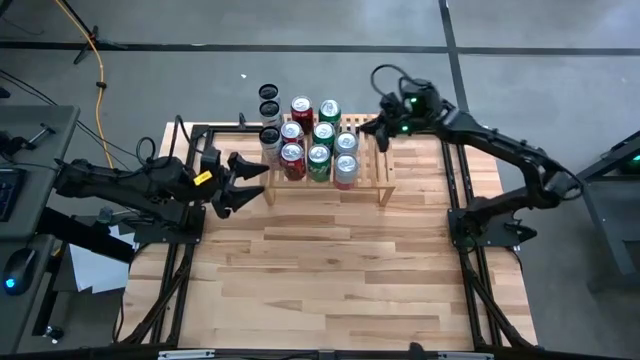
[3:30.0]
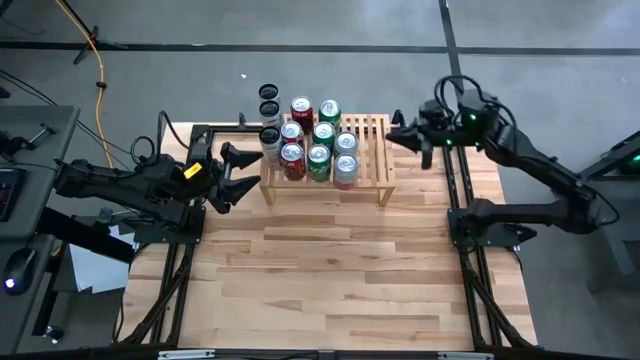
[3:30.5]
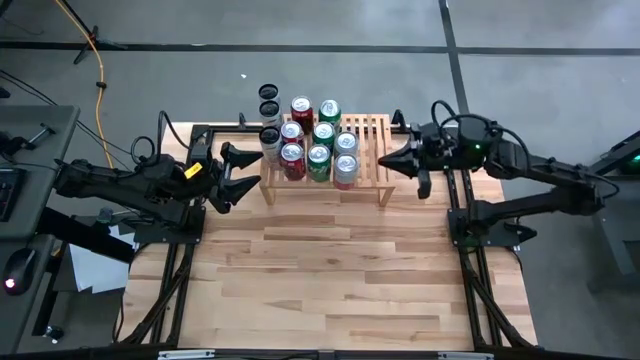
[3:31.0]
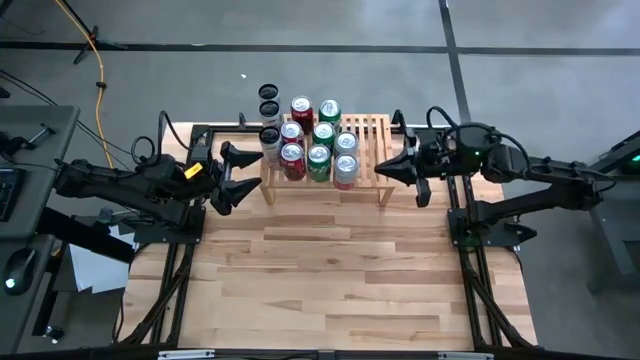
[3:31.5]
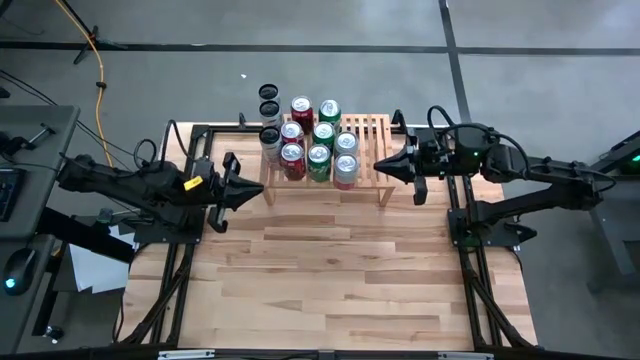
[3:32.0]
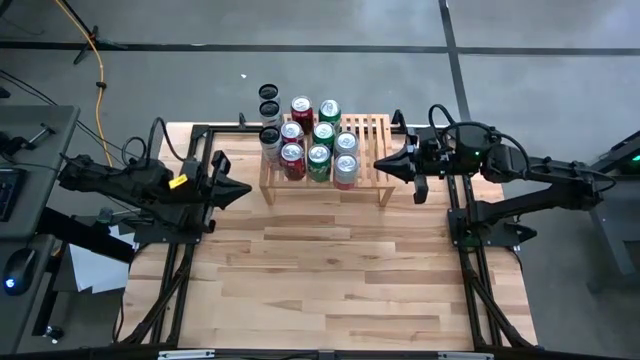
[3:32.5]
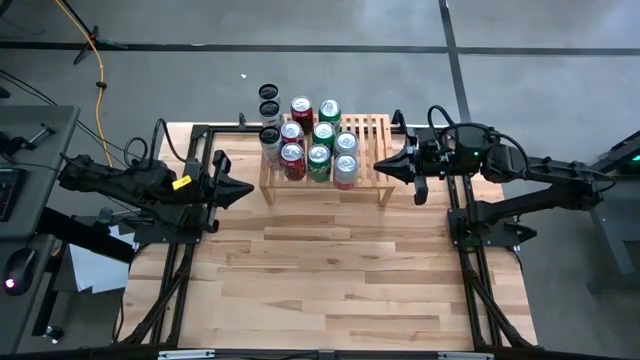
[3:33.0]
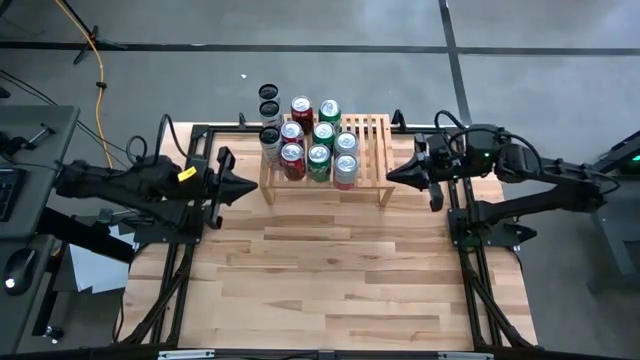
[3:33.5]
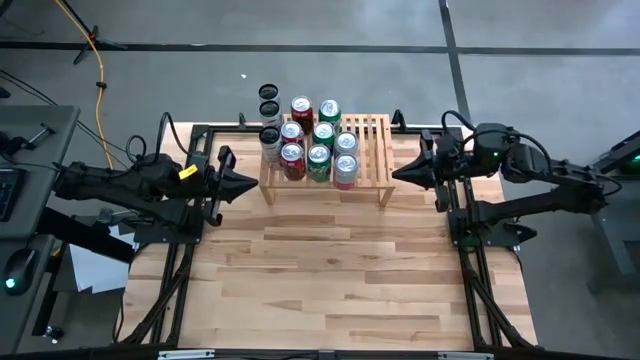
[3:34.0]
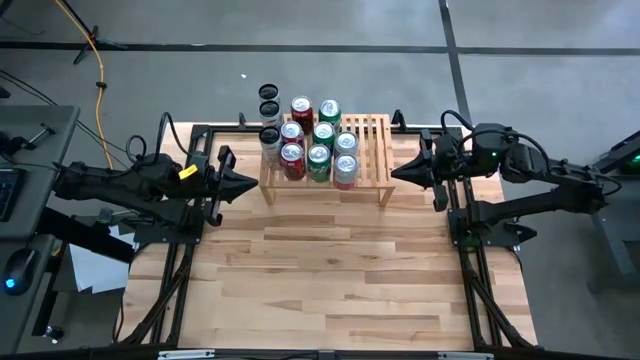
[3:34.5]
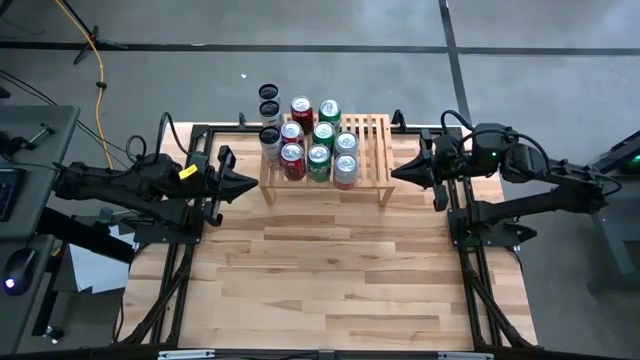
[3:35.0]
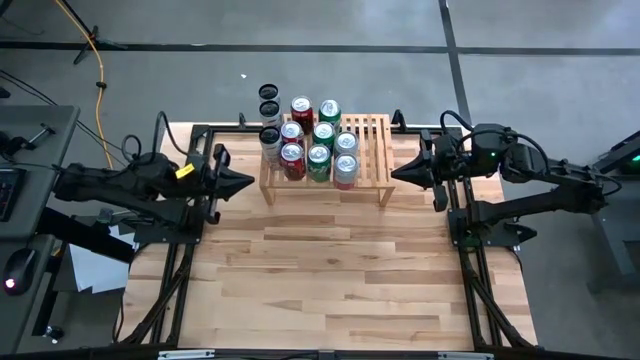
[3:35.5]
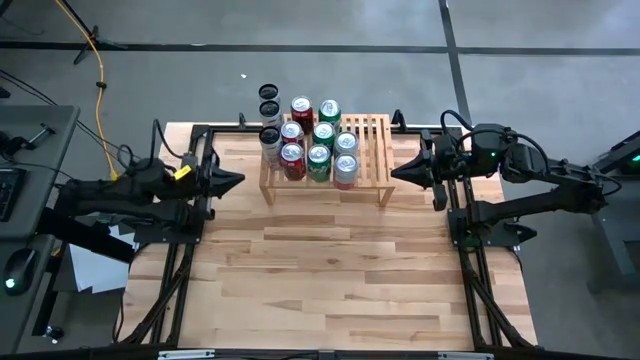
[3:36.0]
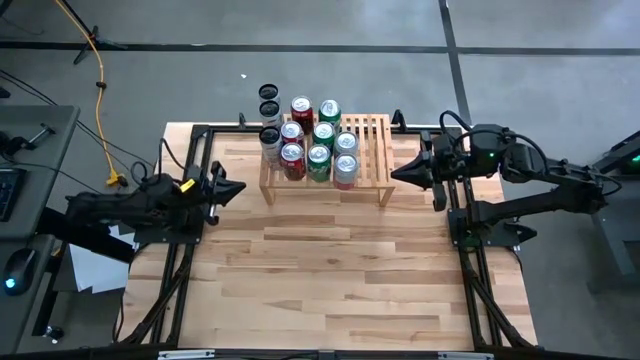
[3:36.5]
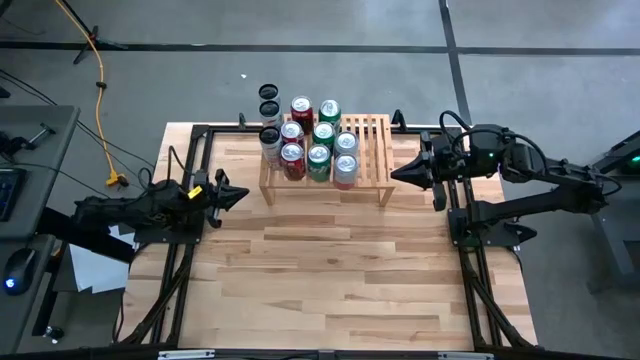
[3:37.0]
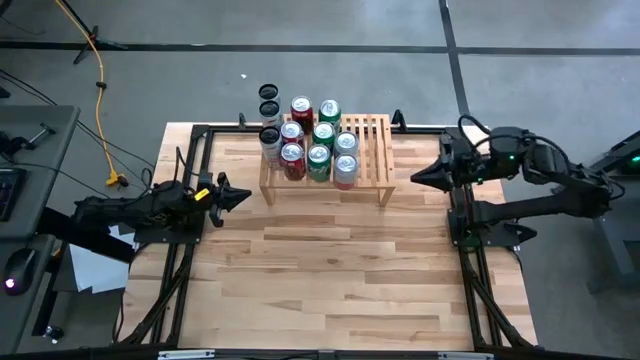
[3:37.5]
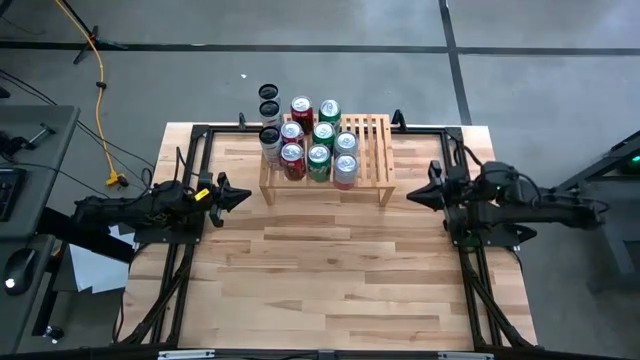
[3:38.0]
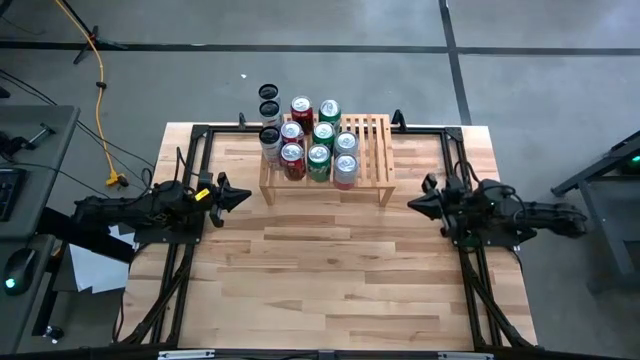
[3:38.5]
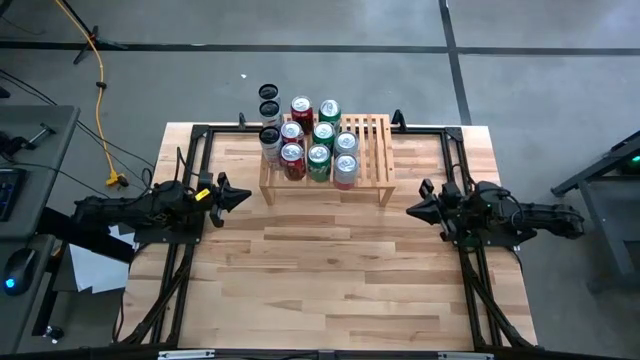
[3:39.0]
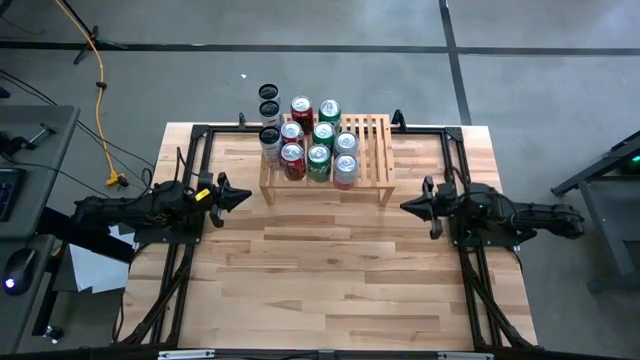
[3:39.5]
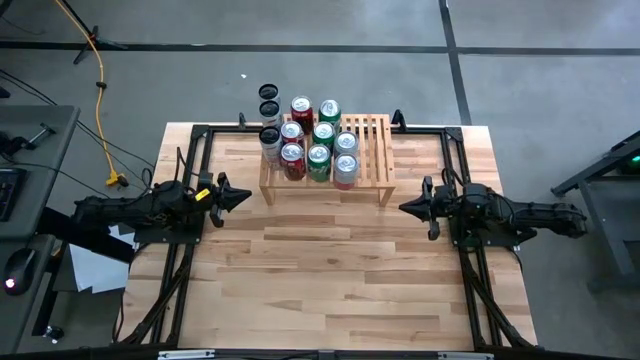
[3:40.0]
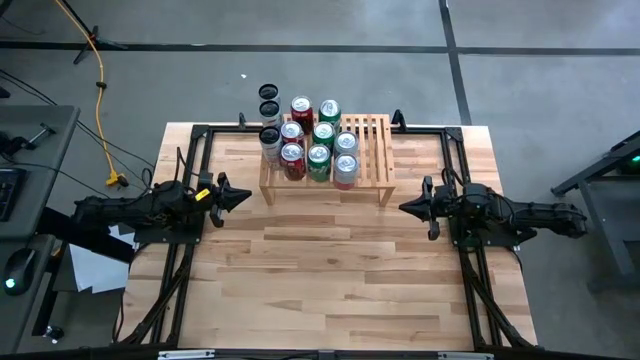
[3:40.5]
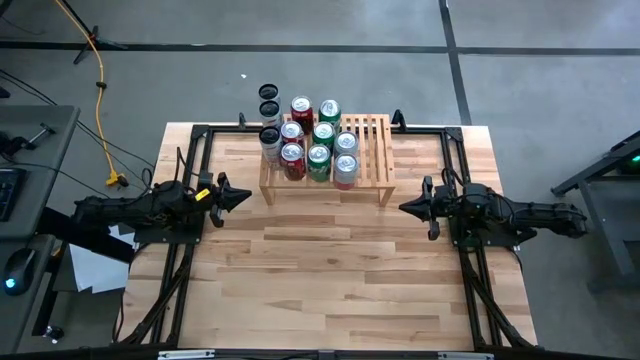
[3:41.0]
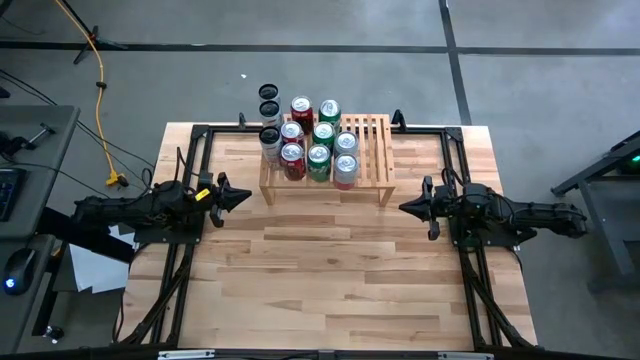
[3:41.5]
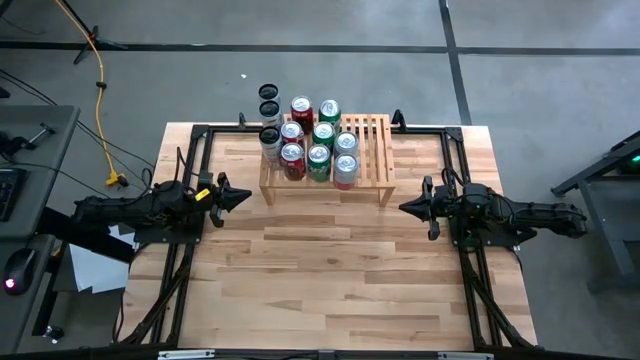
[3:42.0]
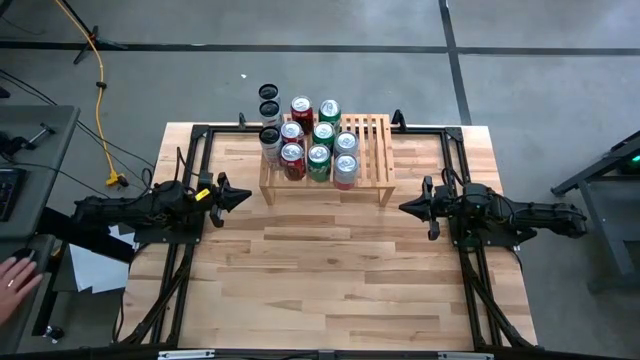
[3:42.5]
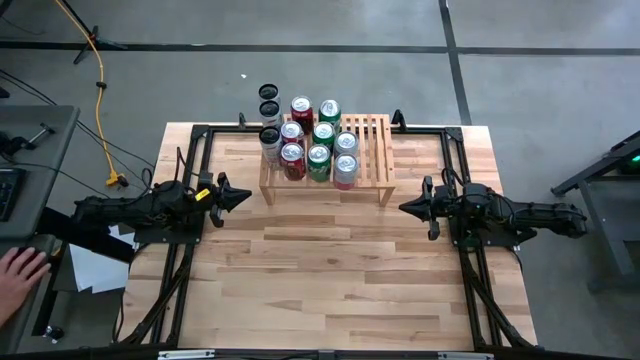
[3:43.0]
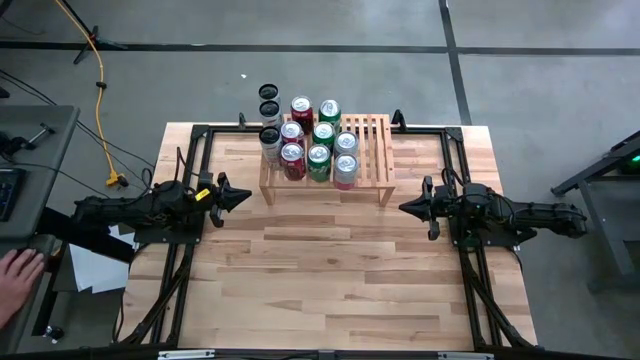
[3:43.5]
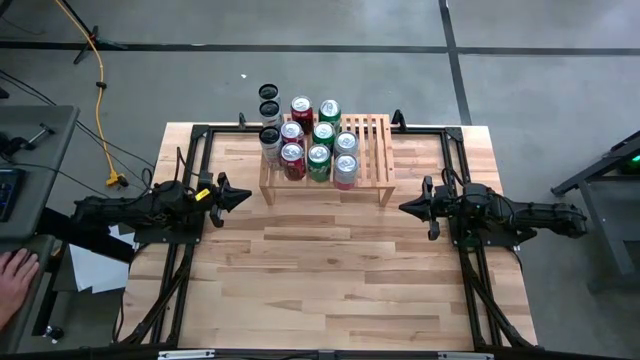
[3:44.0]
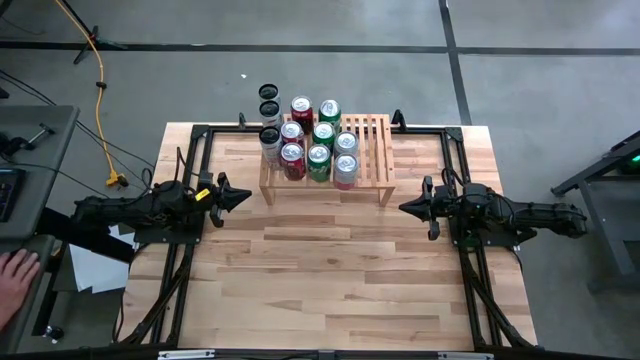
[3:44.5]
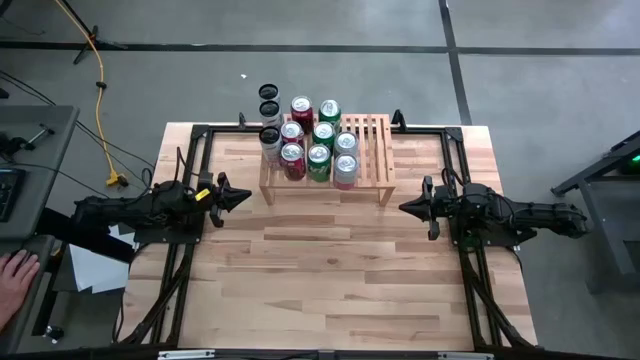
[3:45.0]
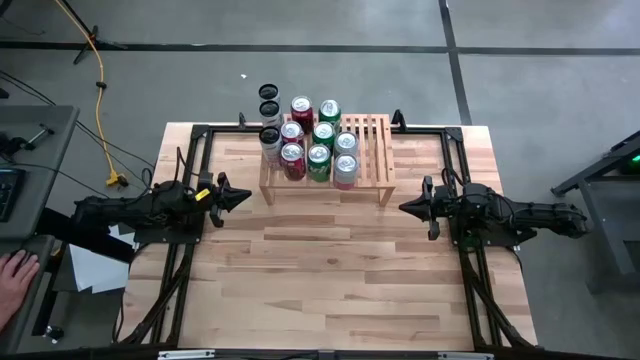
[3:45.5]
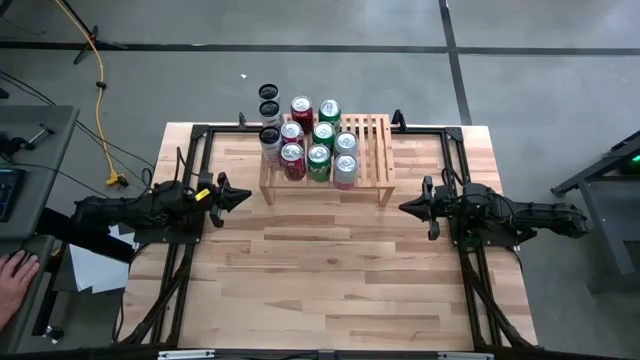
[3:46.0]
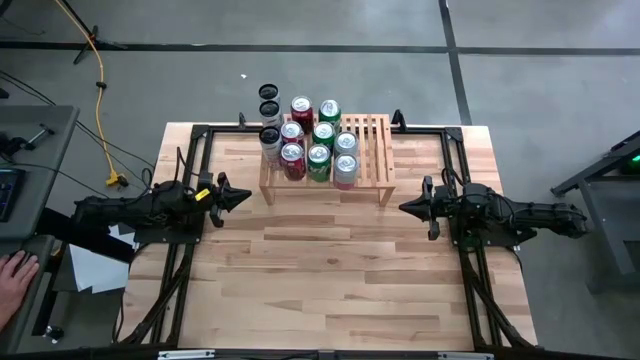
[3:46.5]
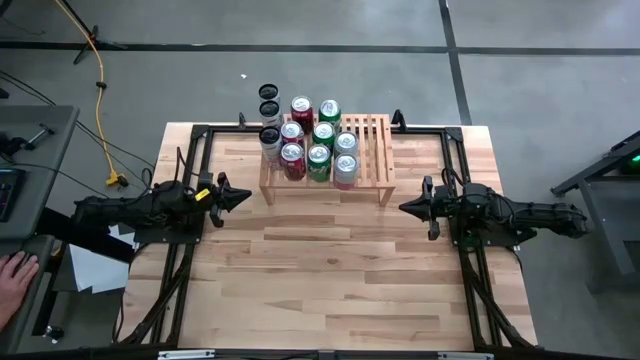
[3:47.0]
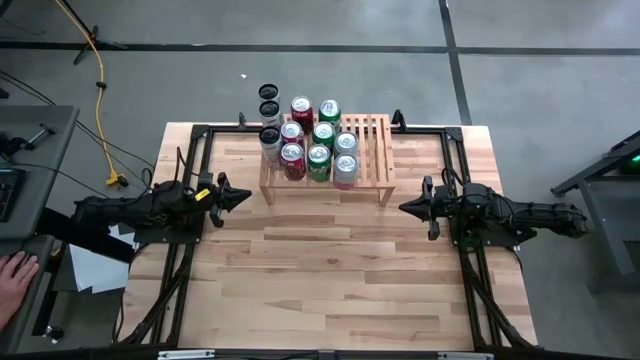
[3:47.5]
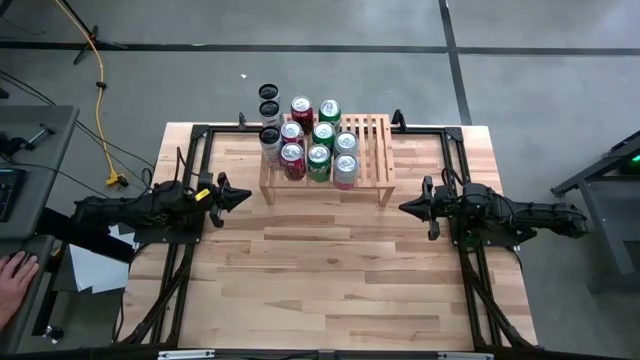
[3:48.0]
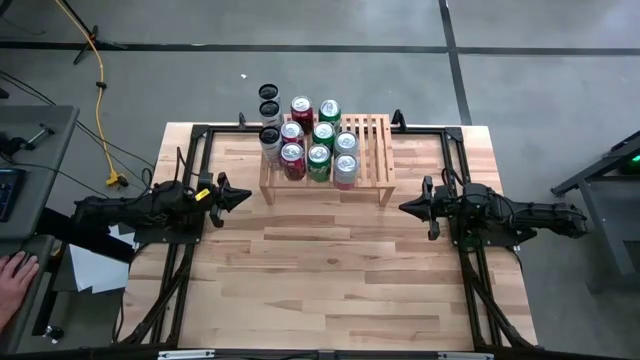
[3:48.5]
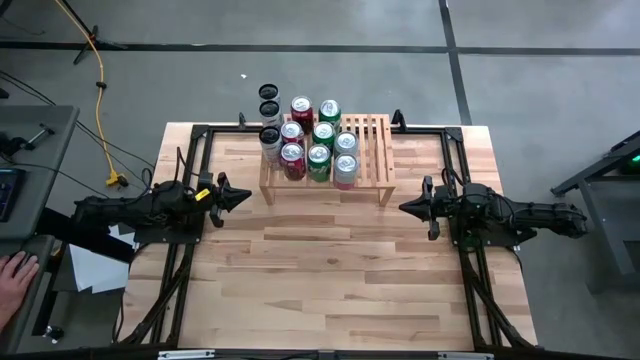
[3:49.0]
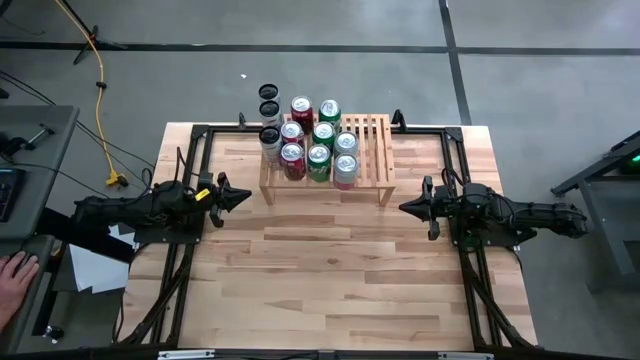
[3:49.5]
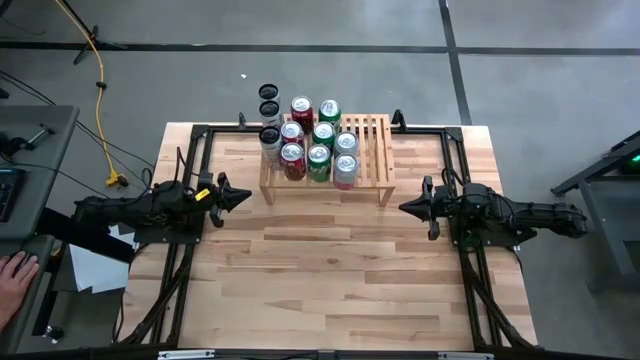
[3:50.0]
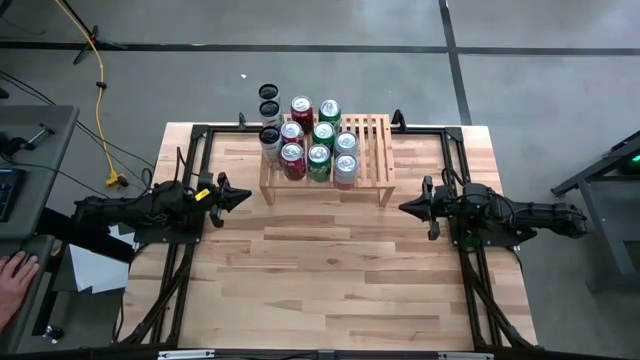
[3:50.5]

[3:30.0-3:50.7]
Task: Place canned beverage on shelf
Return to Home Position
